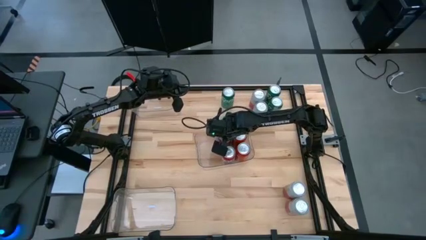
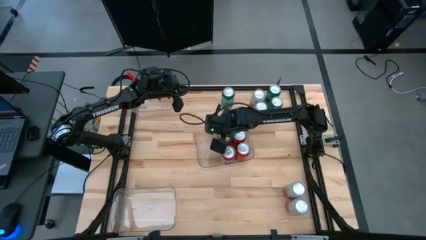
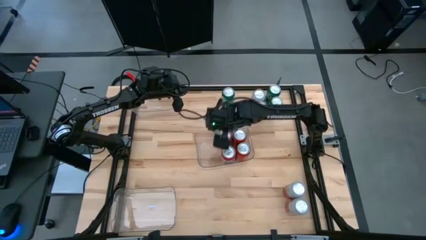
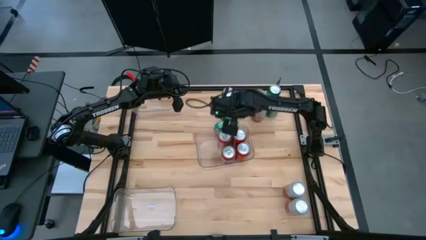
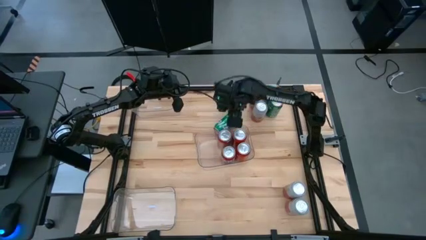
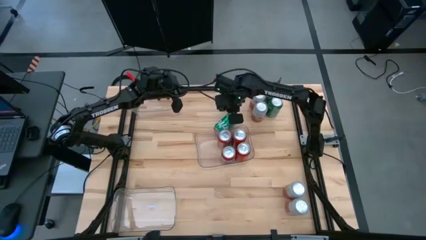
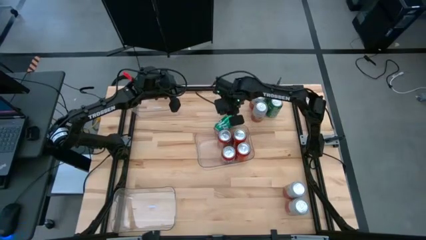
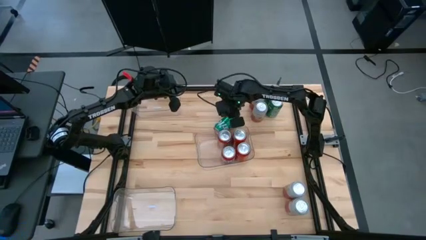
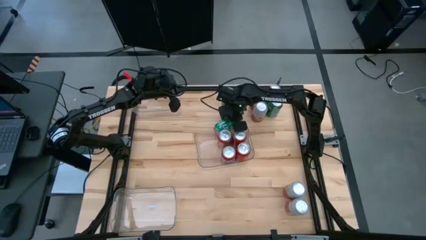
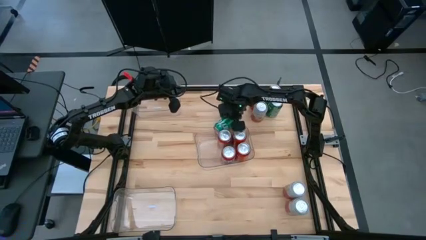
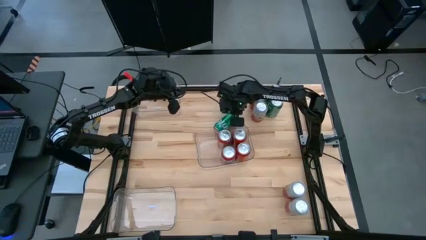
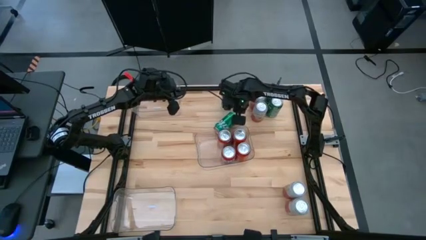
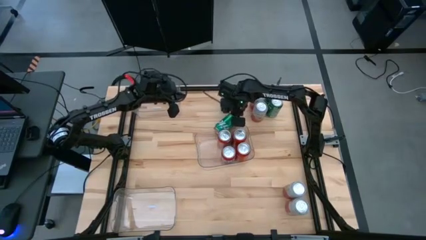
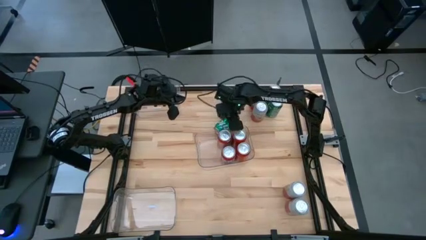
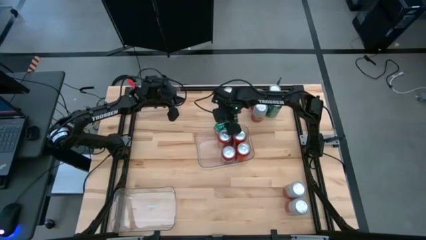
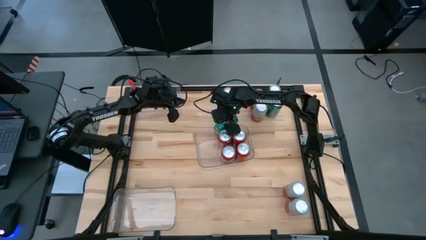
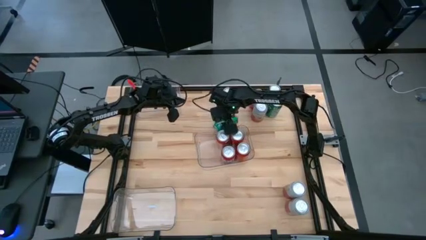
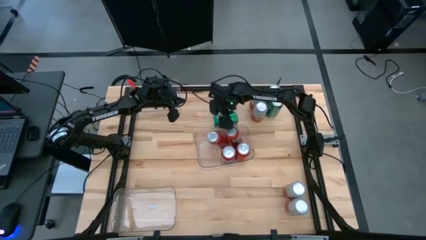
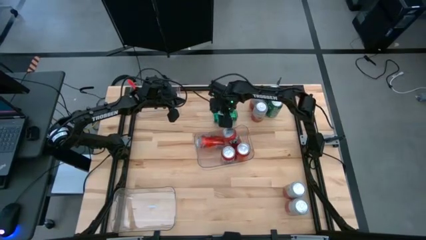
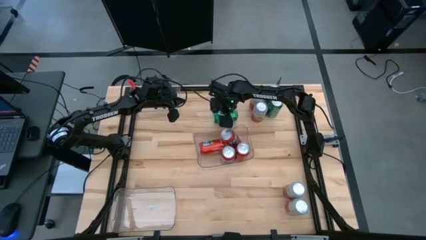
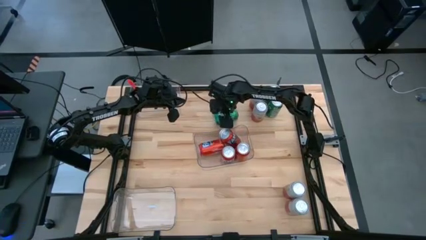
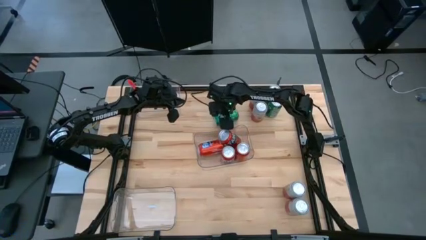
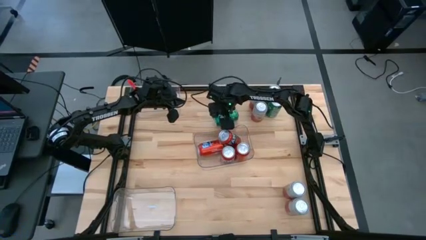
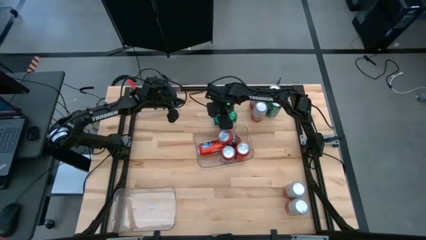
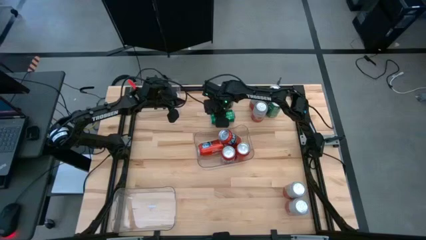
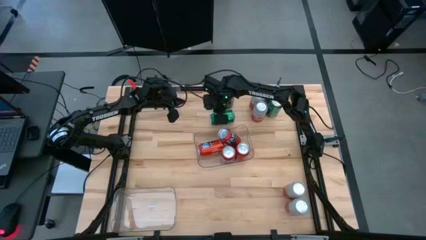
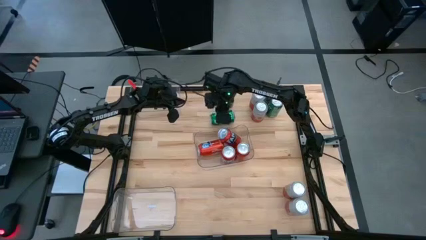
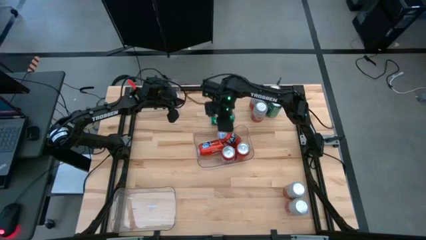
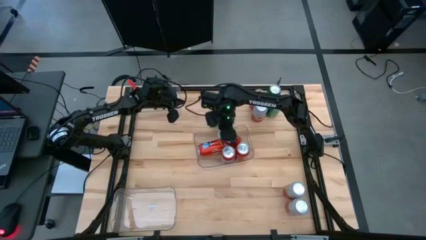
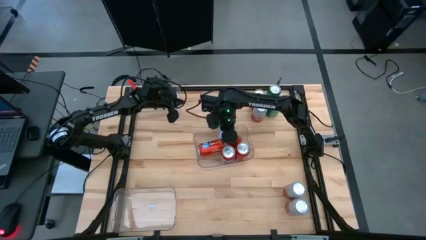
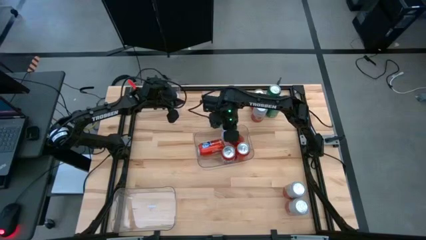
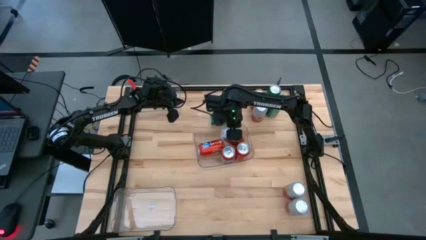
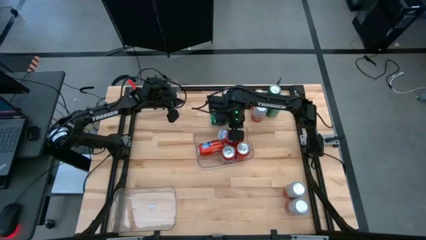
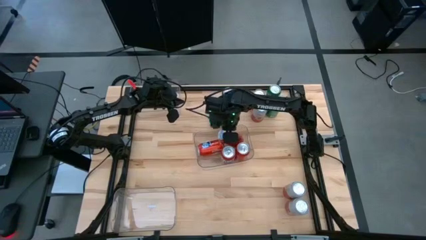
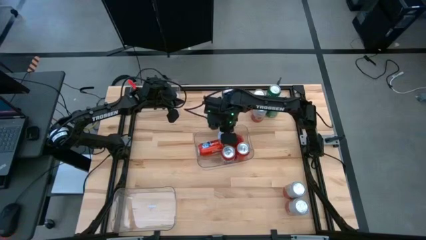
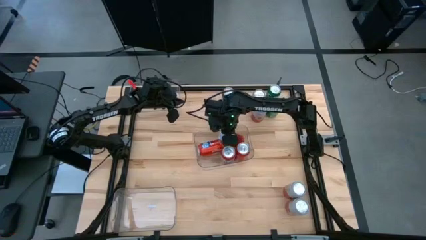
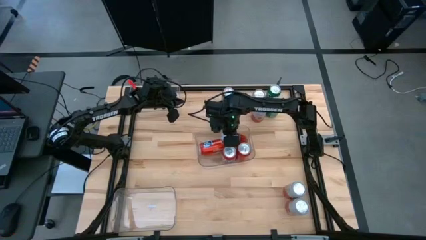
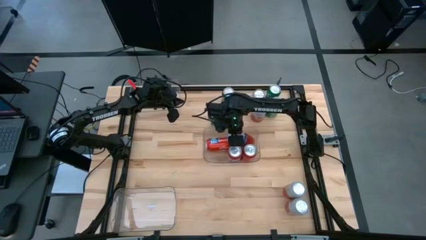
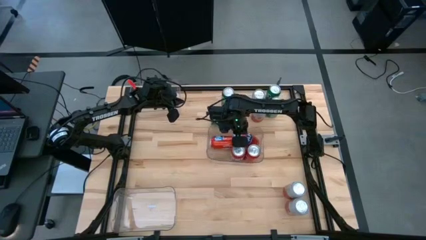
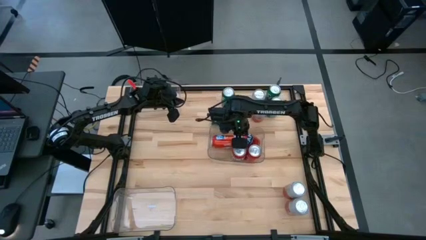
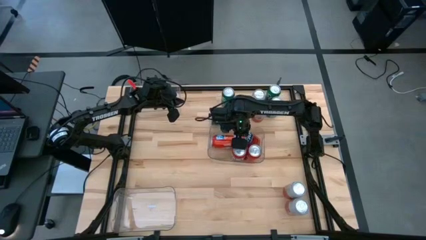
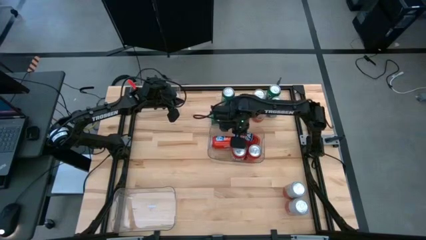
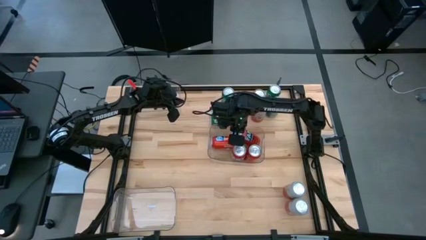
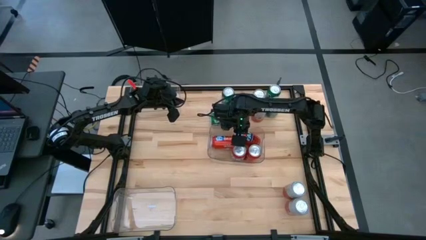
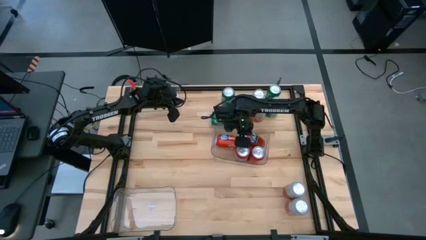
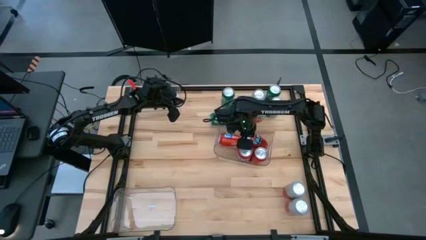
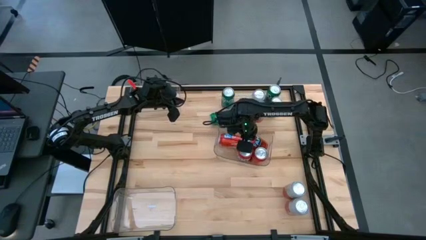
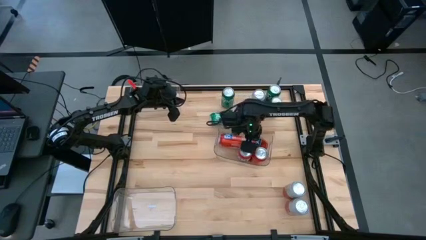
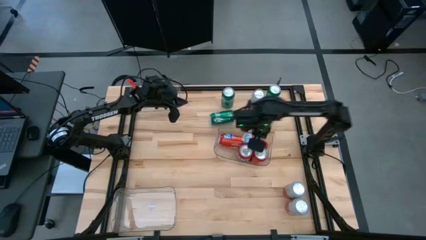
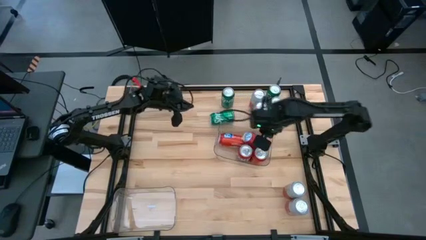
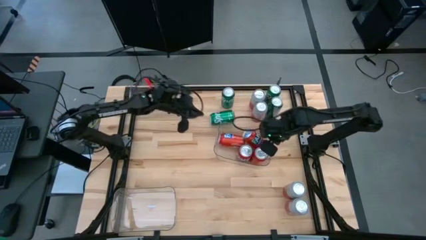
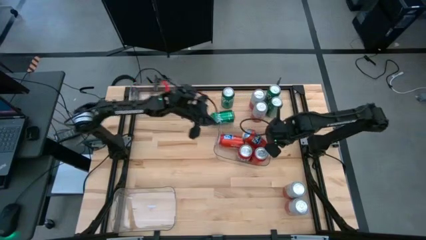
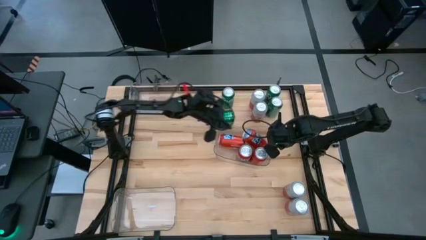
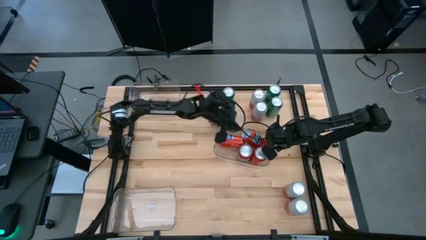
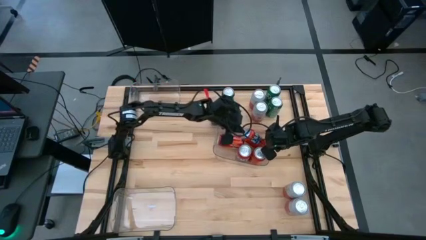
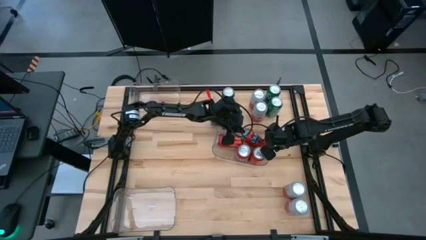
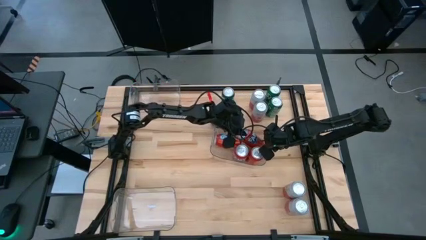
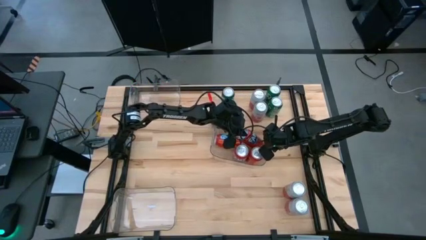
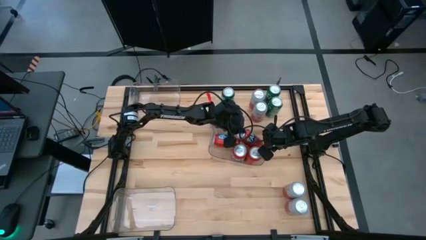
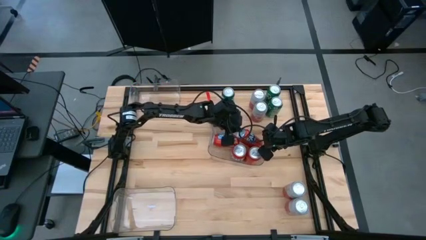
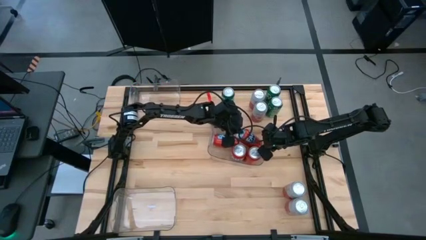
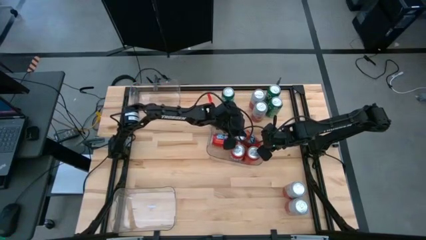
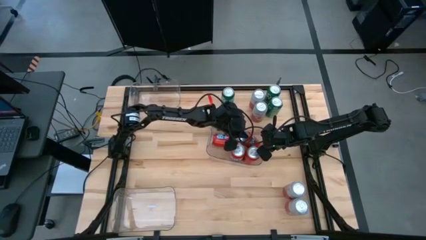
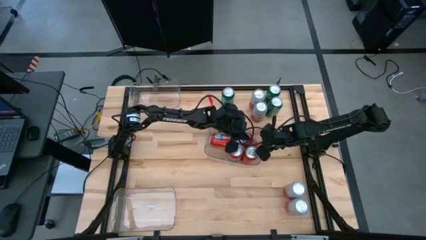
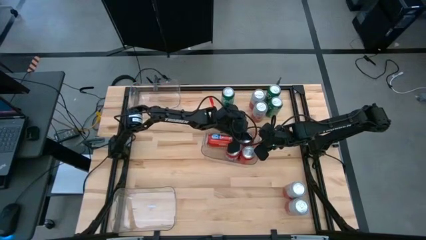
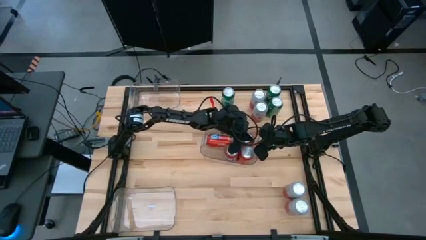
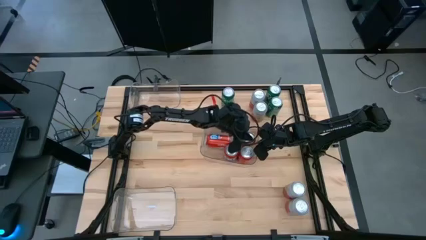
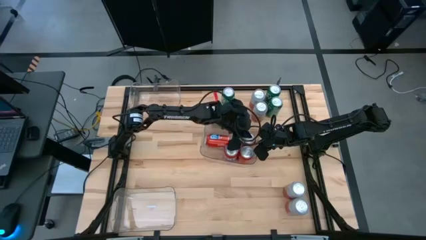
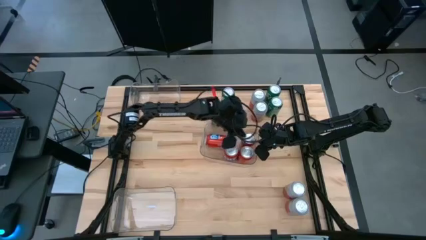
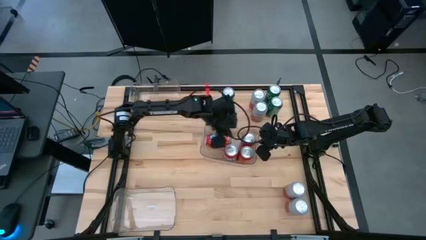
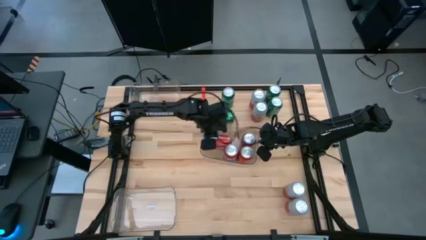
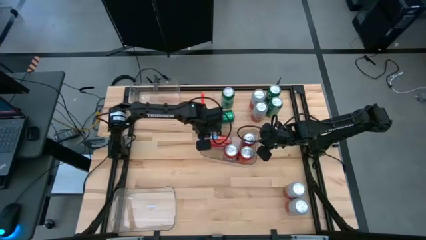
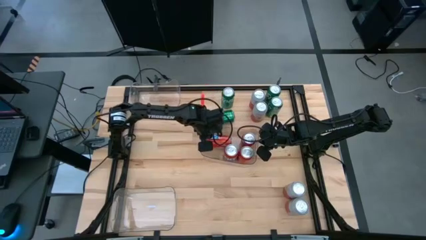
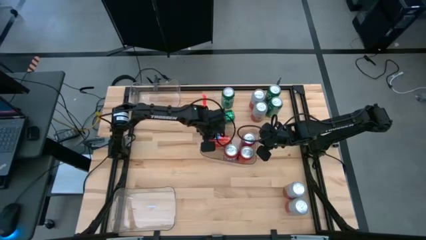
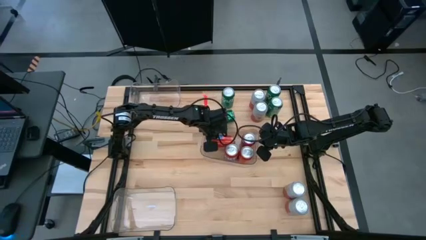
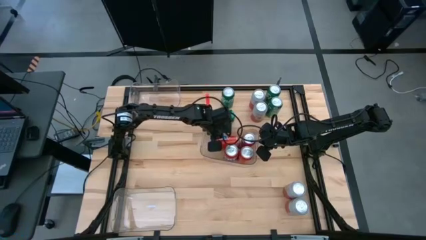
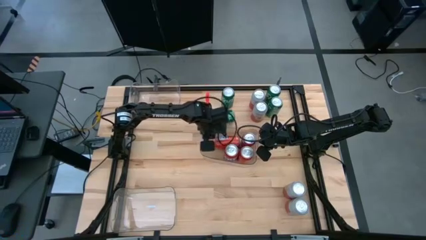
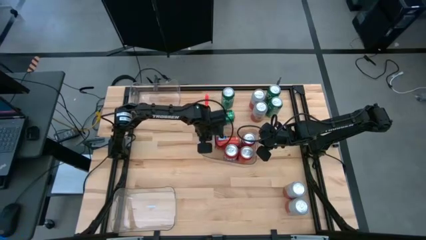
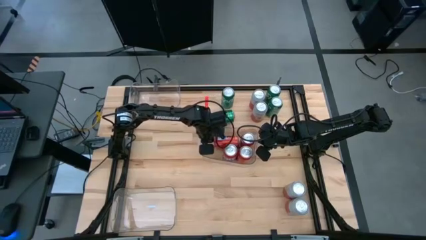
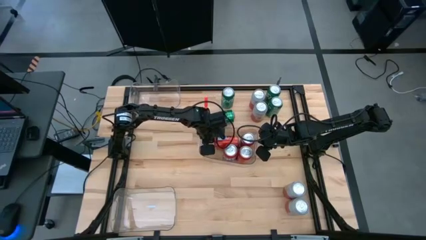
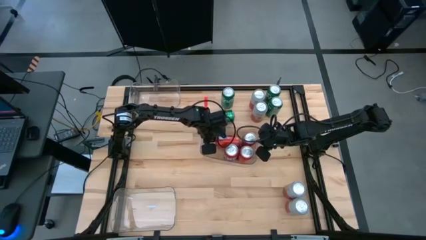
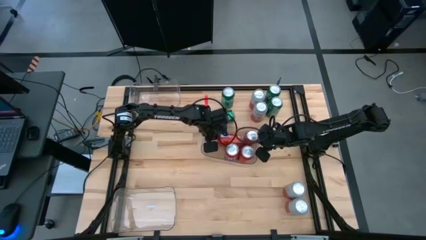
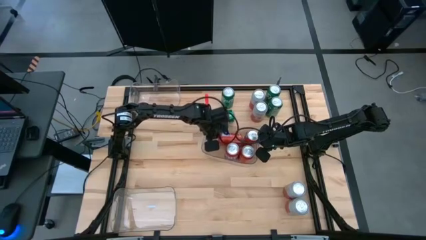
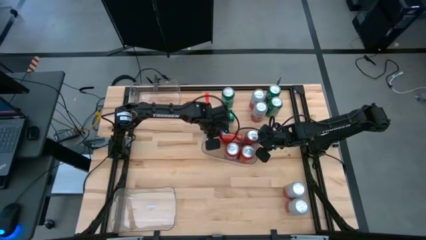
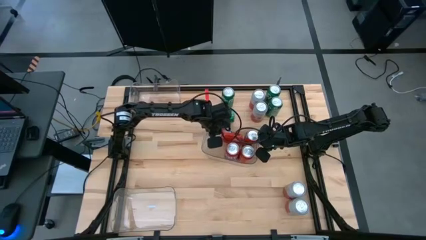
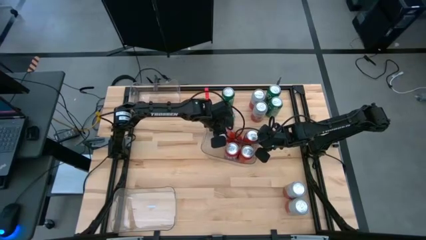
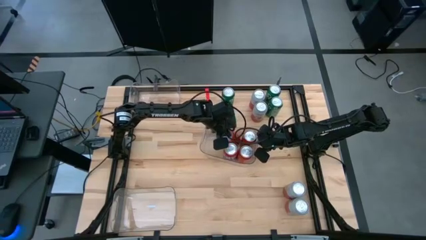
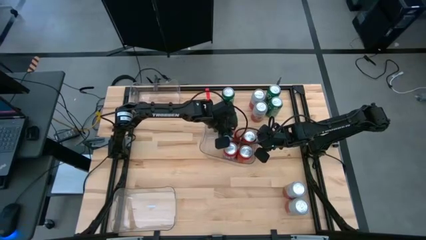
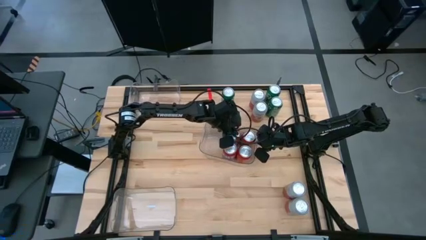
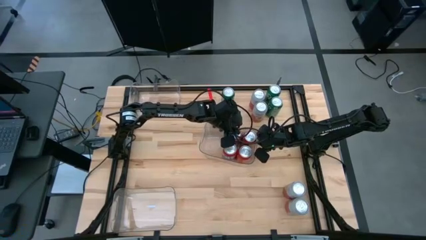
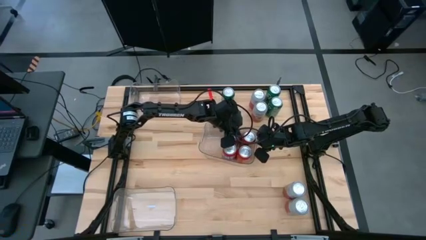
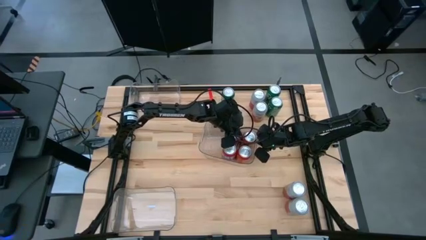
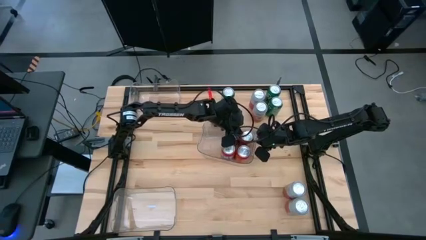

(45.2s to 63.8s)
Task: Sort soda cans
Adjust the orange soda can
